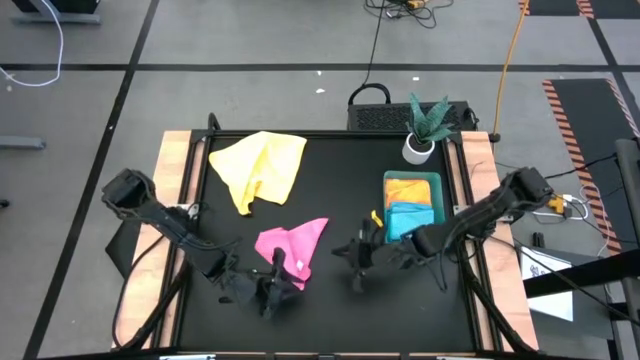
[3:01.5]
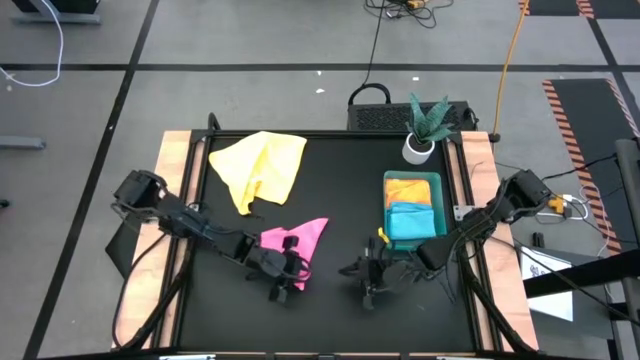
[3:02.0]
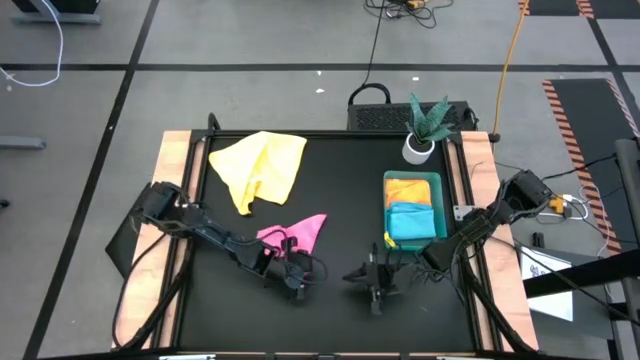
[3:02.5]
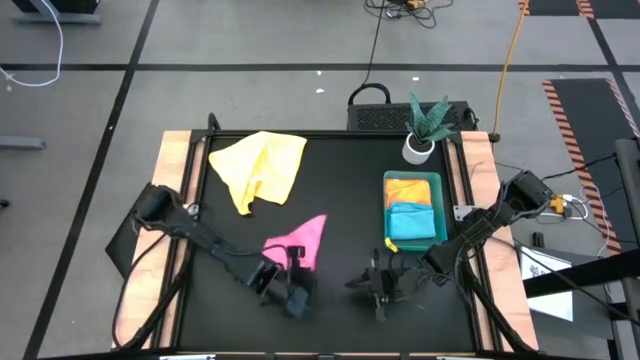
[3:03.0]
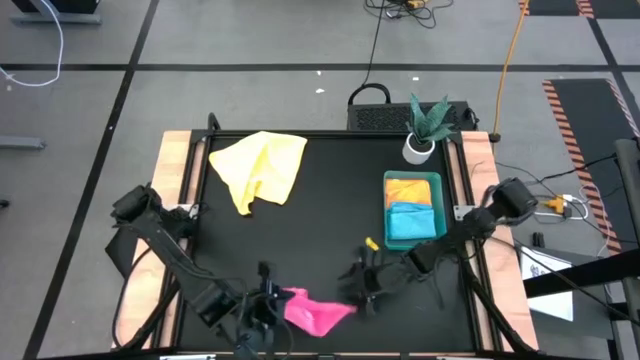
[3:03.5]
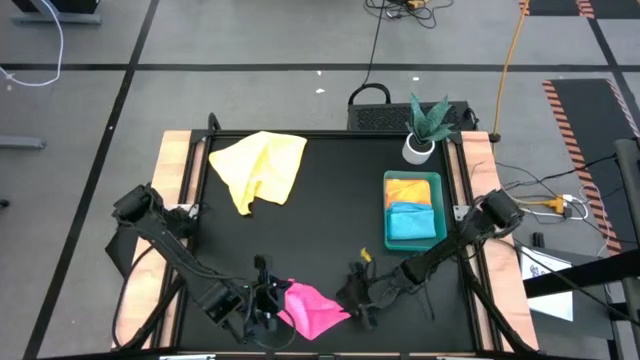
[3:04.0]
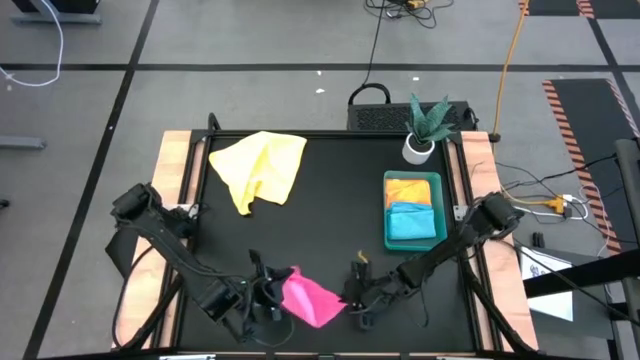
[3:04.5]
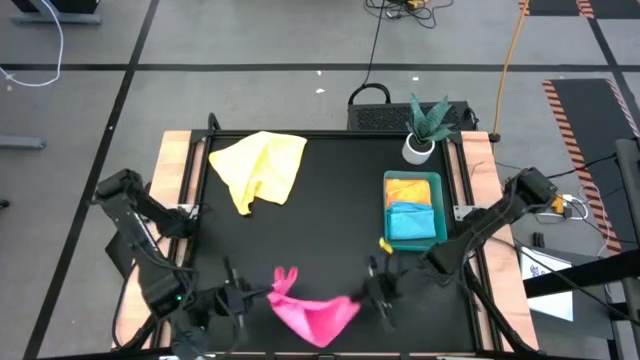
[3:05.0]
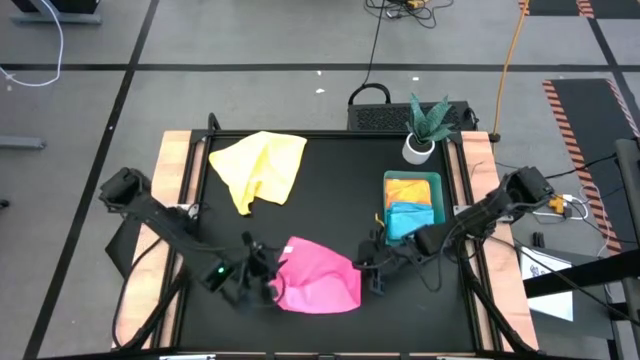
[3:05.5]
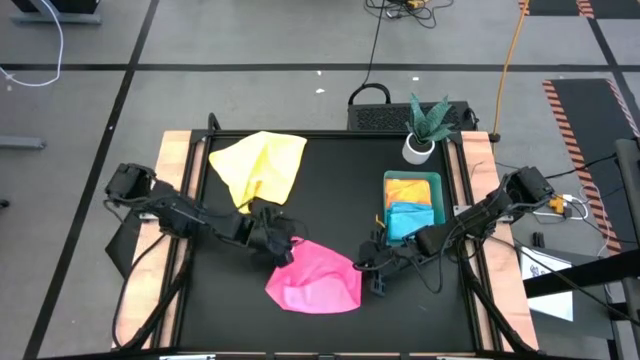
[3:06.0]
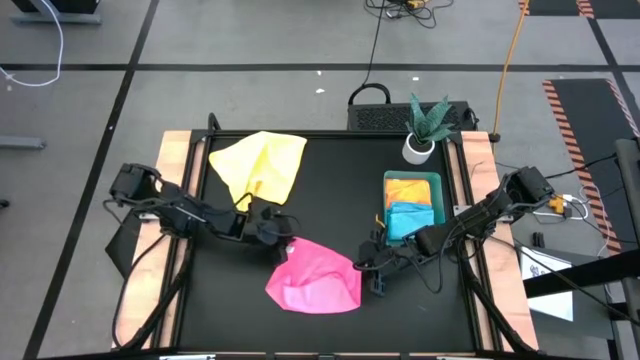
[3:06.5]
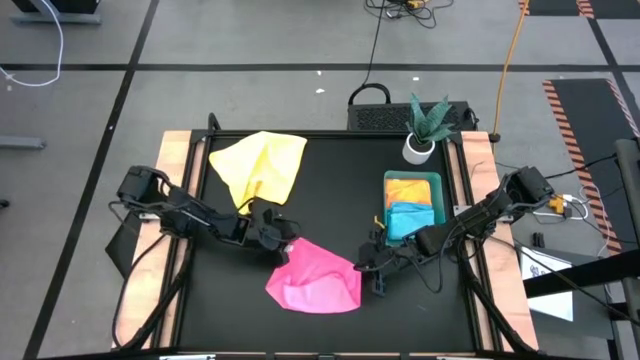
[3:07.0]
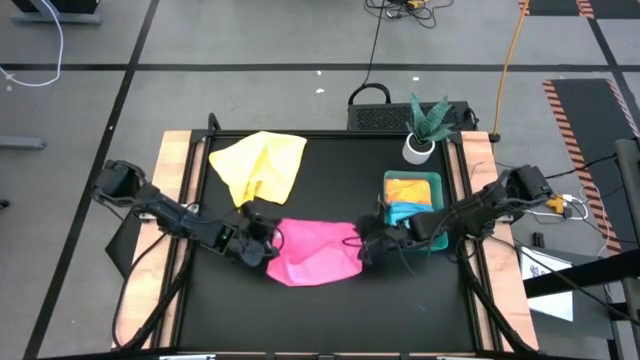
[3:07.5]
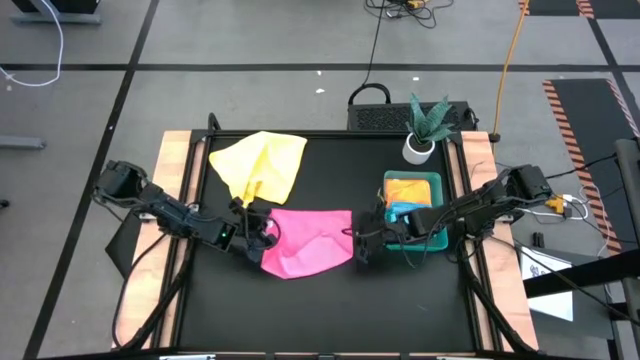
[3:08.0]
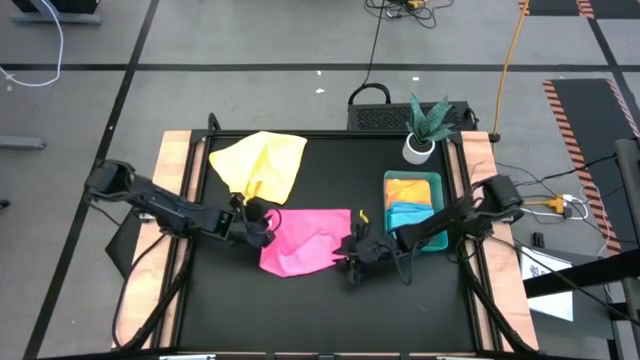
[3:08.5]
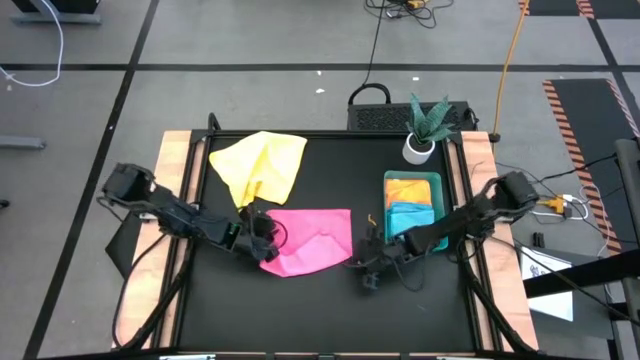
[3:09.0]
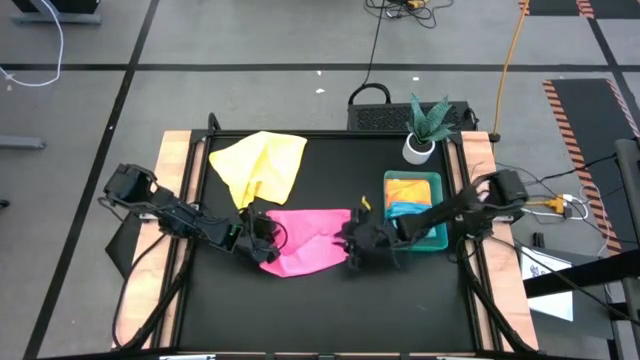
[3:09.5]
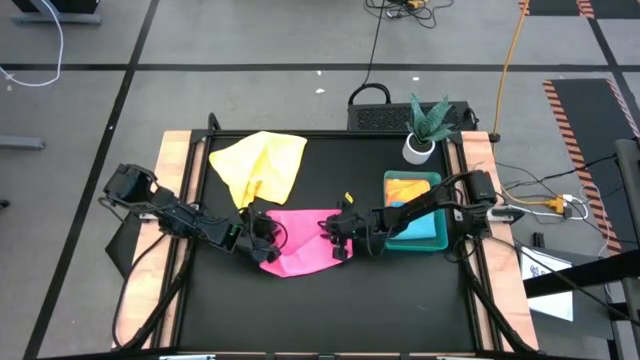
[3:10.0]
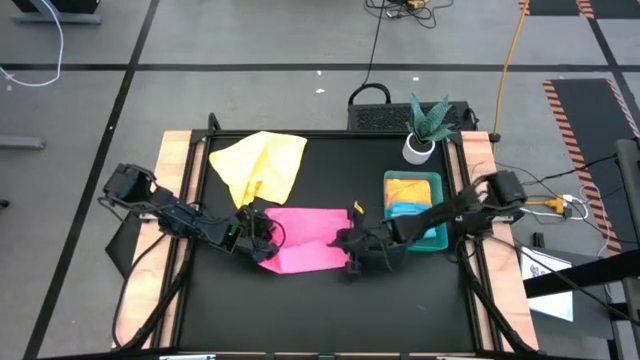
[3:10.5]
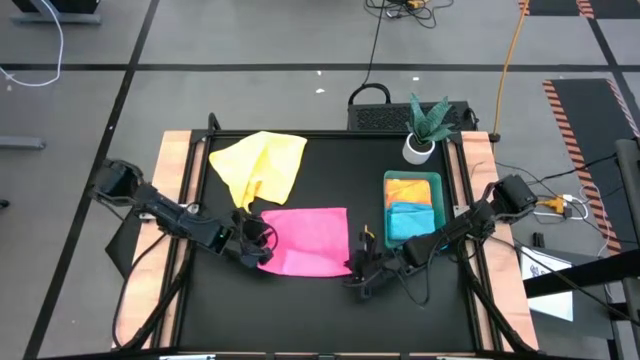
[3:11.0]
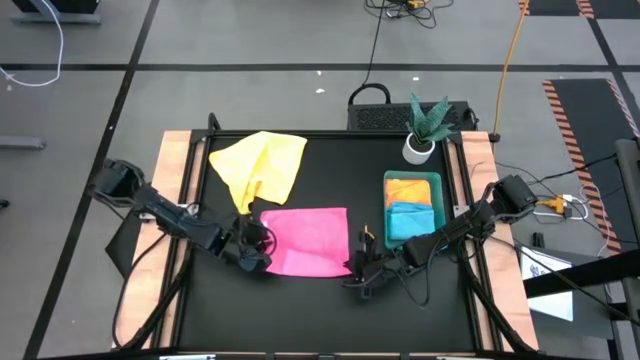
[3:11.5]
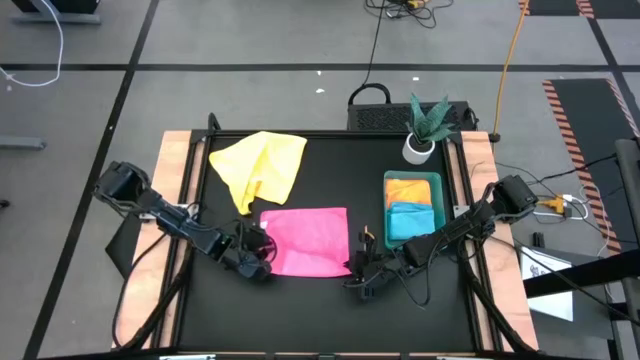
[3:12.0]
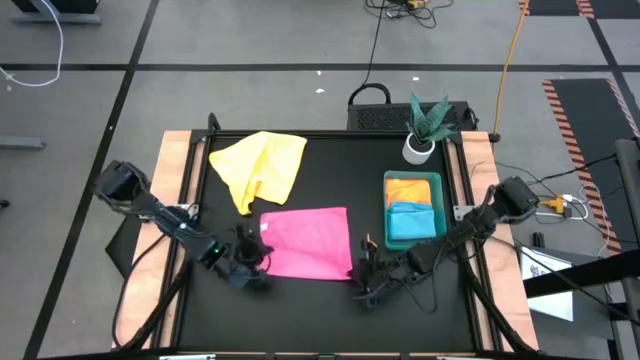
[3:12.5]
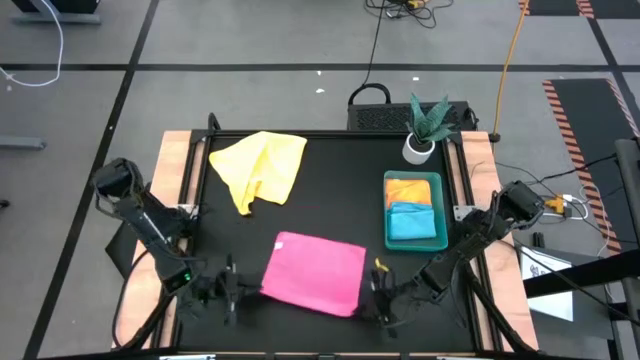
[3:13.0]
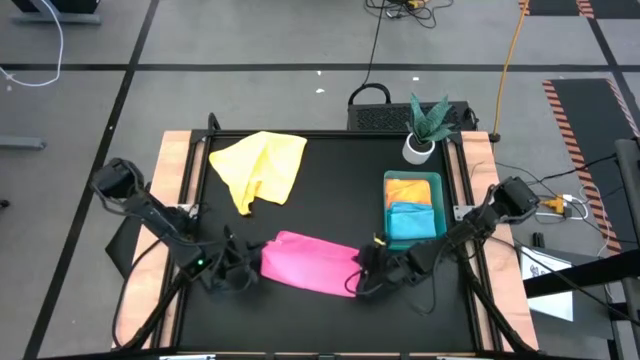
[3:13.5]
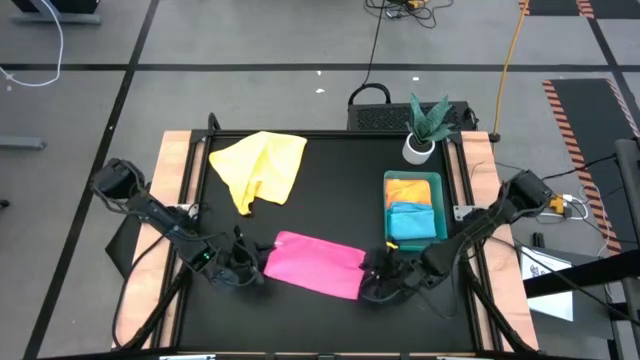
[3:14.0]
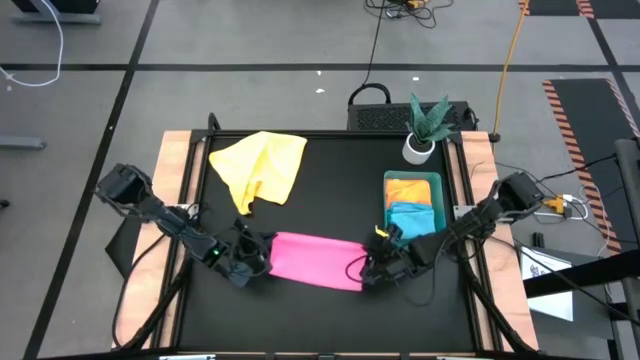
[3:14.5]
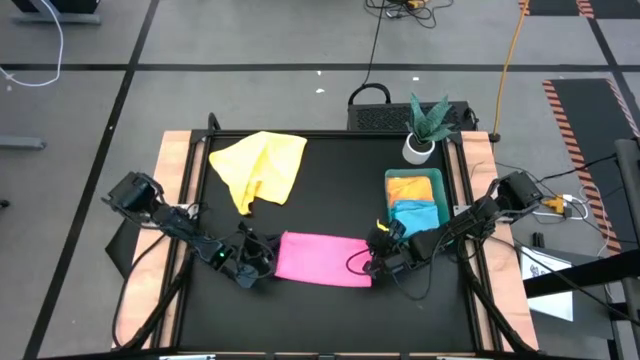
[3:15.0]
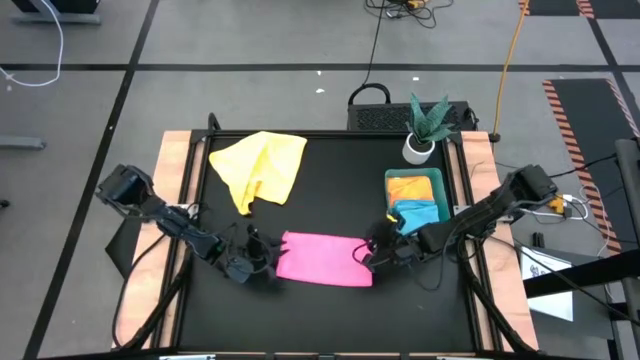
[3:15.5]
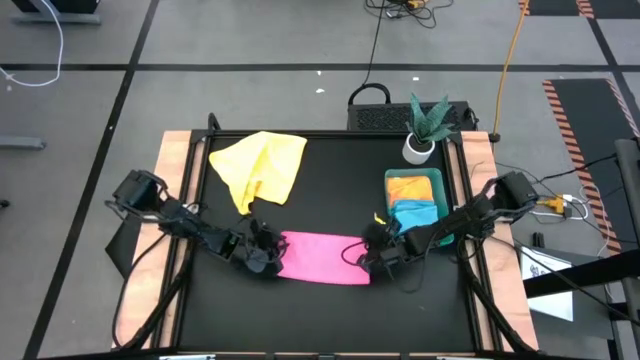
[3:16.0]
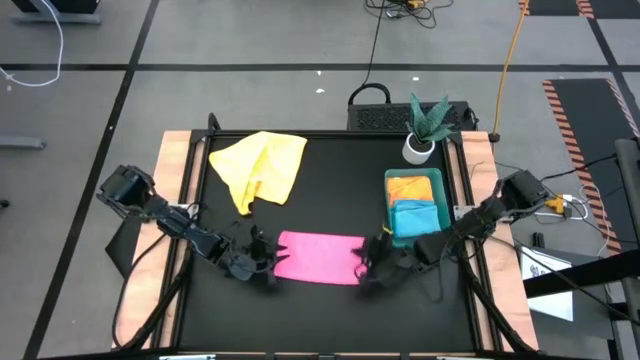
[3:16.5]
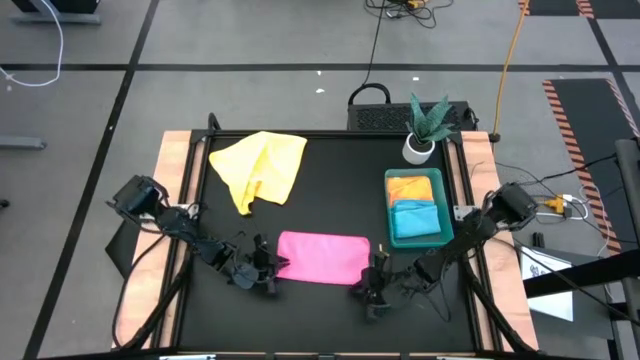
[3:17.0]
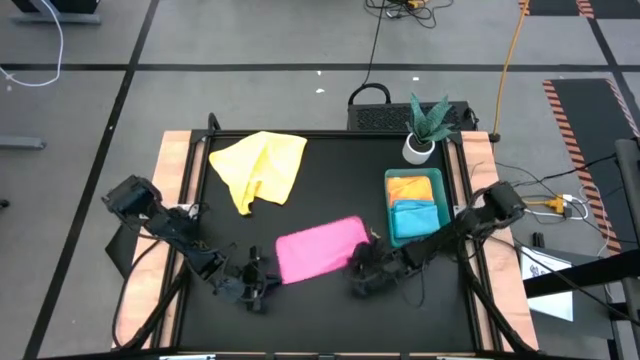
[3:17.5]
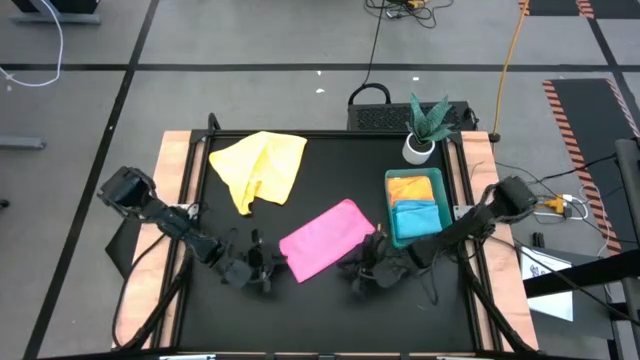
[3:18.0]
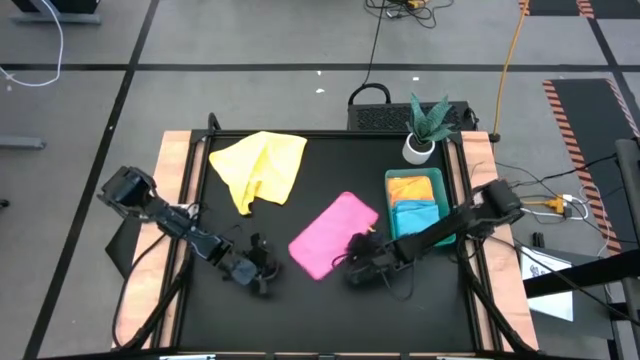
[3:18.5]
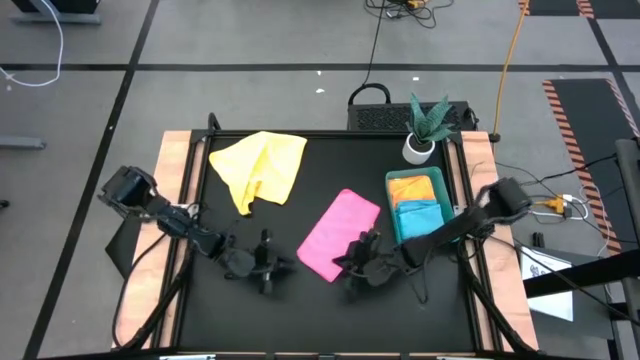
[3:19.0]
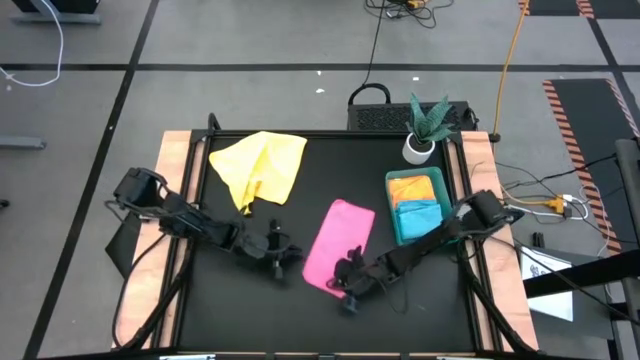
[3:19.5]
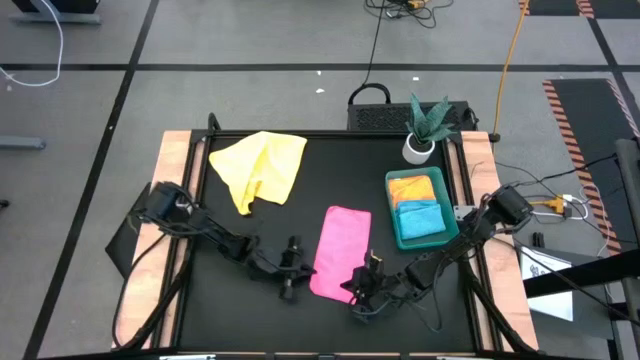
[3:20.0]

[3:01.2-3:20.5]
Task: Fold microfiber towels
Fold the pink microfiber cloth

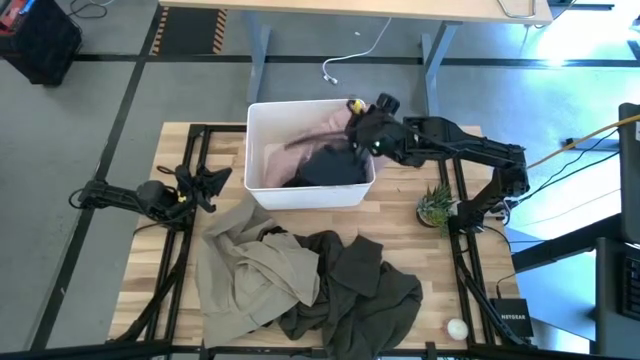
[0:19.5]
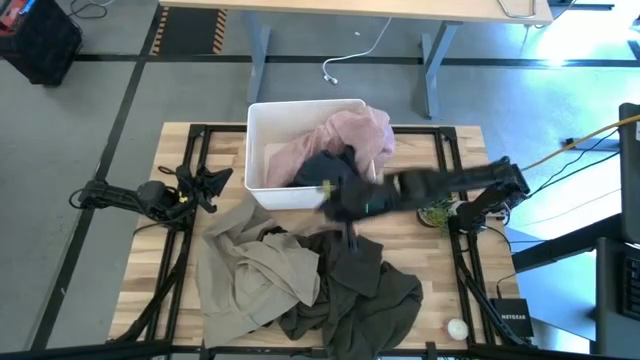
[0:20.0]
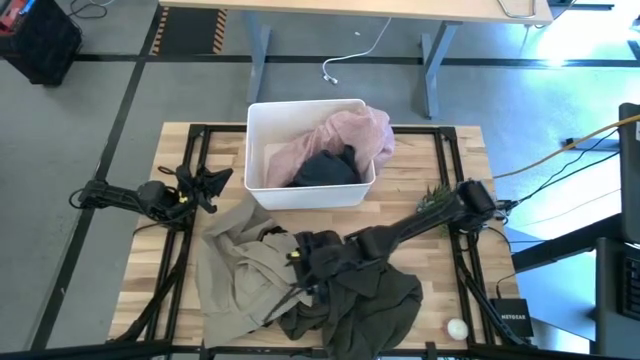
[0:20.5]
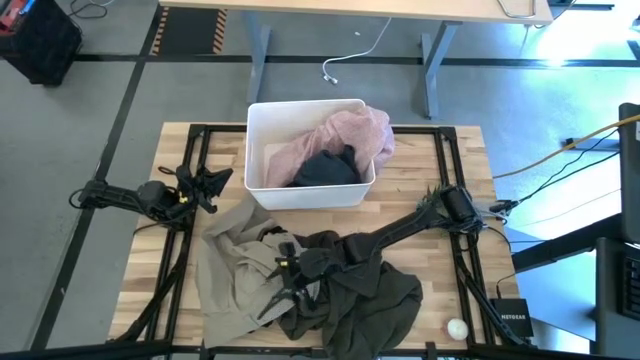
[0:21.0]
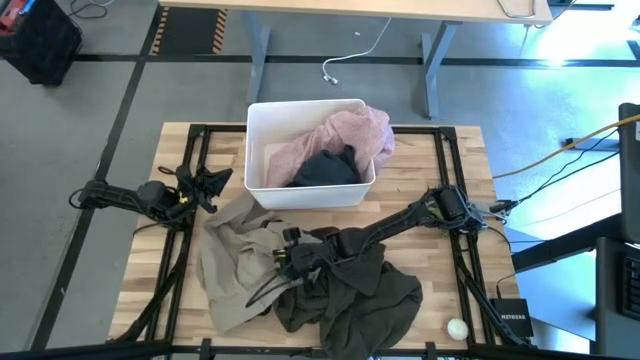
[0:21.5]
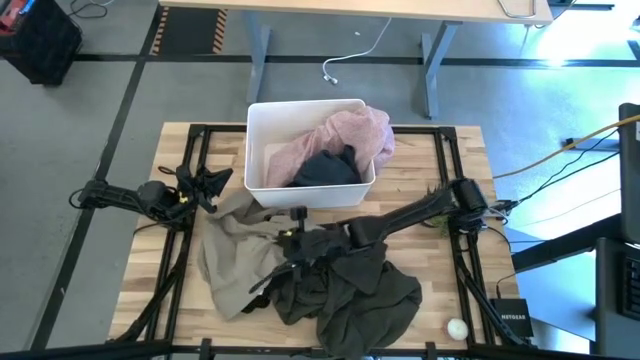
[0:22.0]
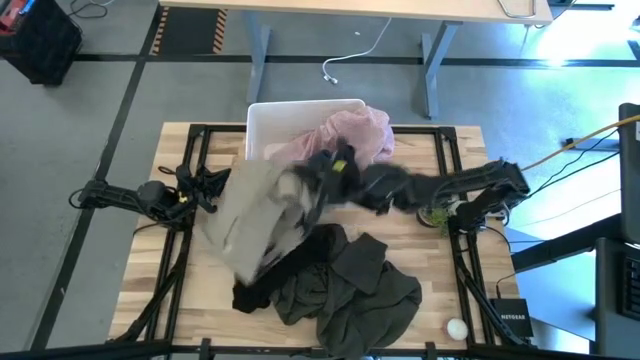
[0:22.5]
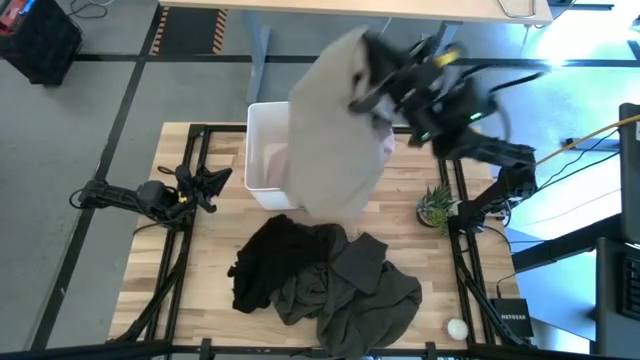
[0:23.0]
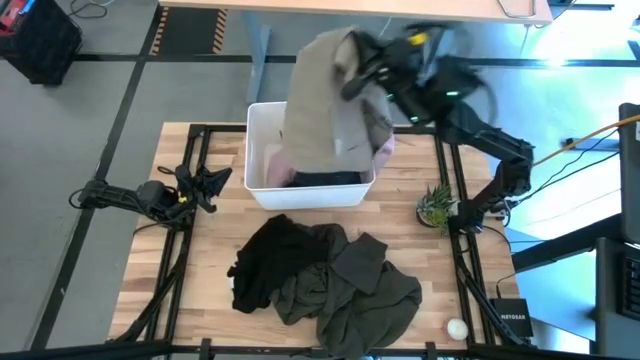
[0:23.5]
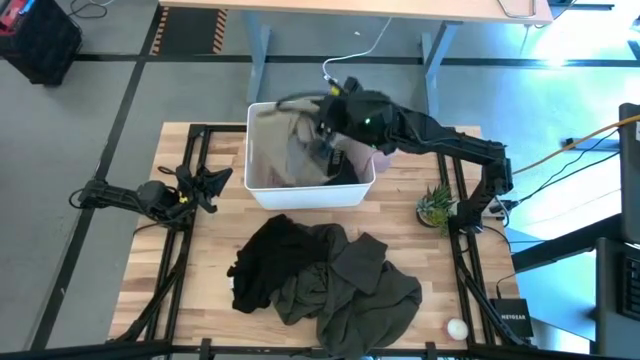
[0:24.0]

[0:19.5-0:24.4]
Task: Sort clothes
Put the brown pants into the white bin
